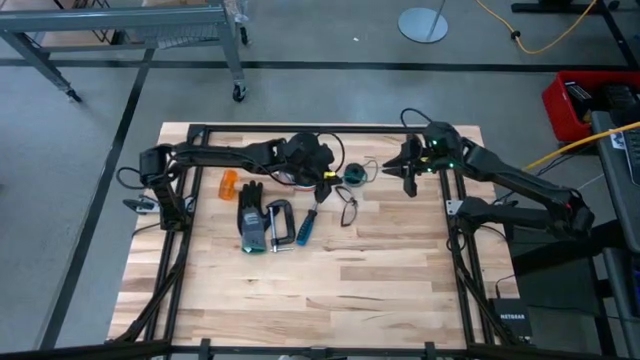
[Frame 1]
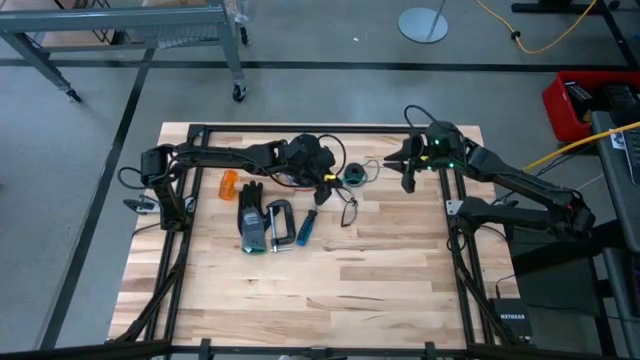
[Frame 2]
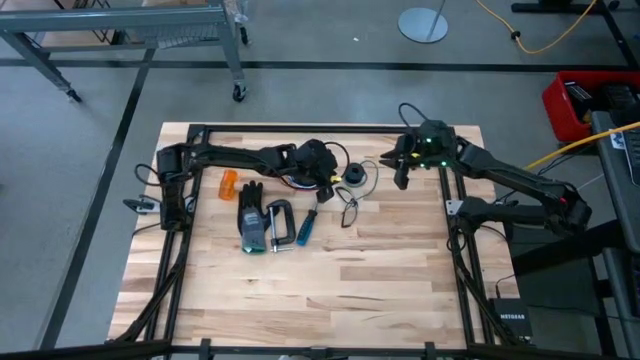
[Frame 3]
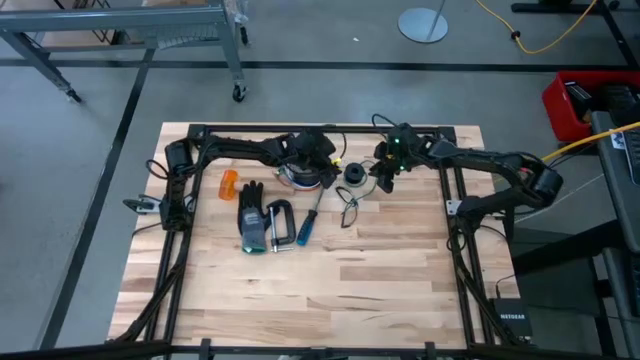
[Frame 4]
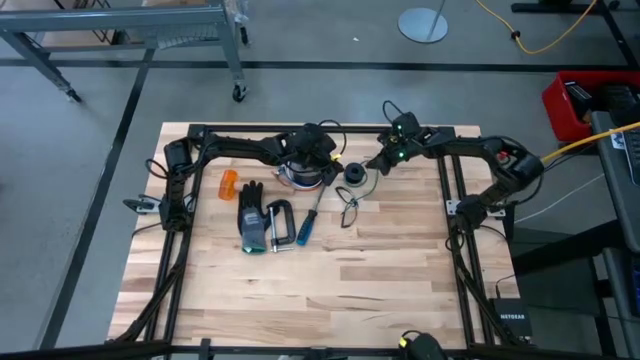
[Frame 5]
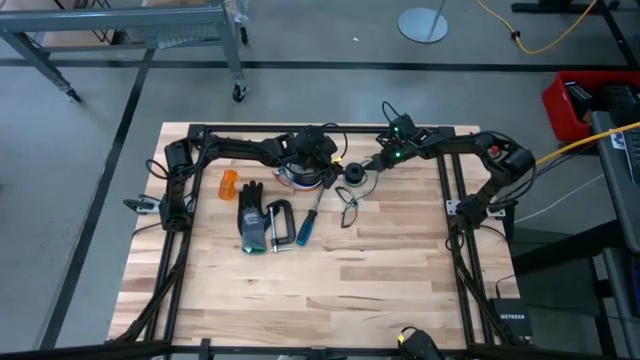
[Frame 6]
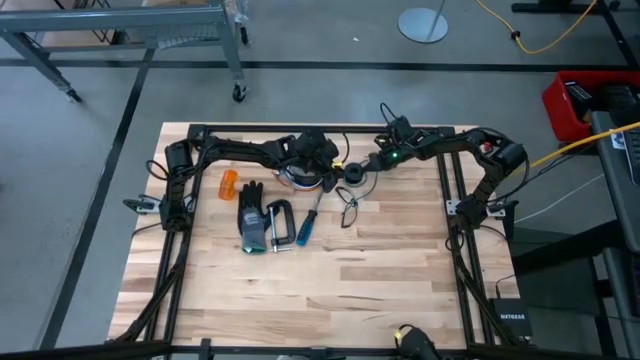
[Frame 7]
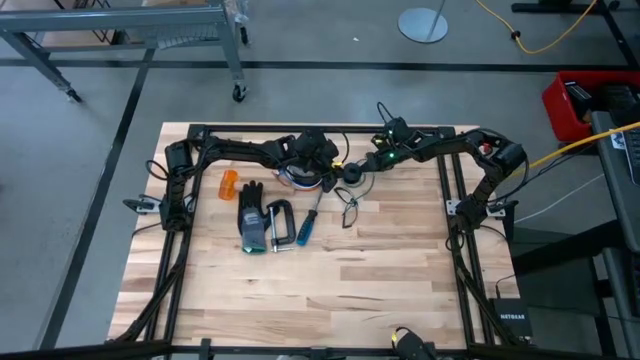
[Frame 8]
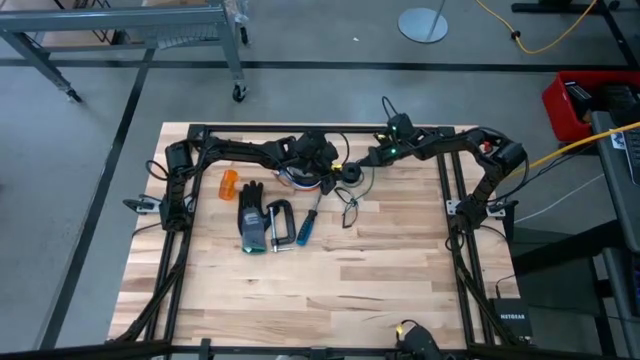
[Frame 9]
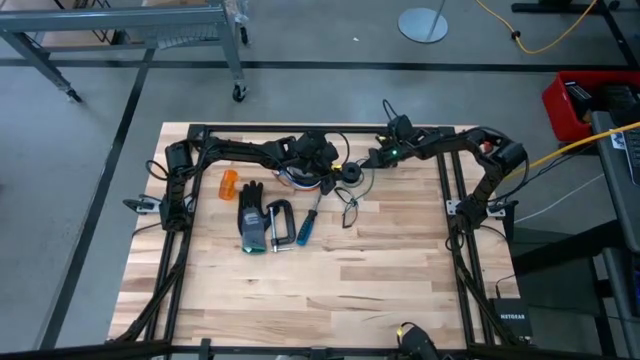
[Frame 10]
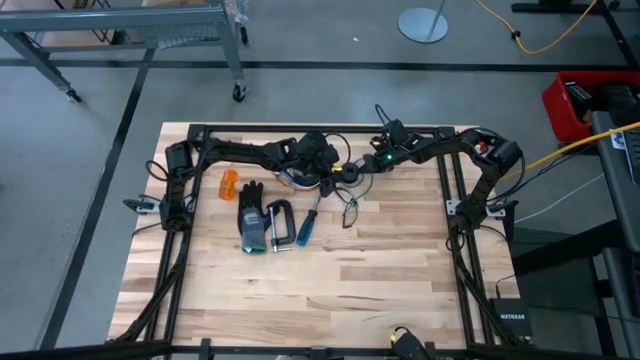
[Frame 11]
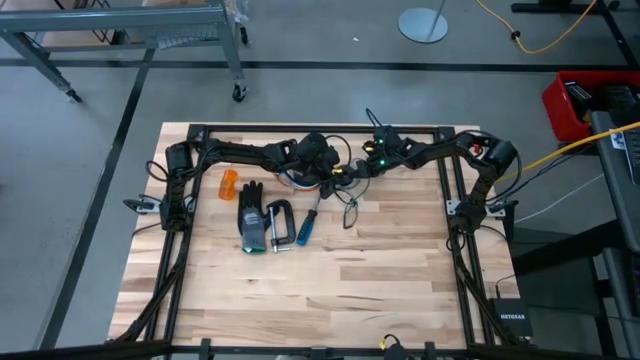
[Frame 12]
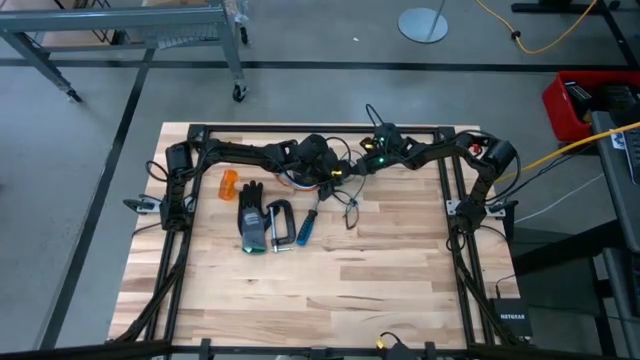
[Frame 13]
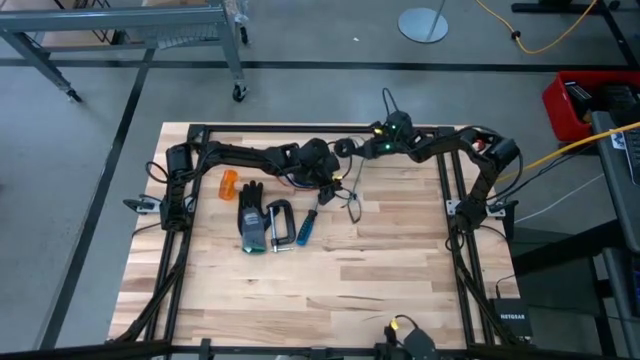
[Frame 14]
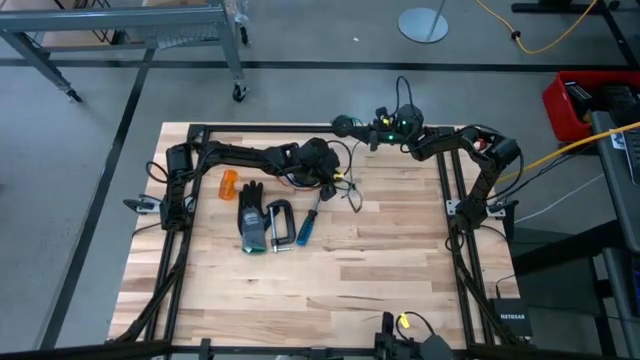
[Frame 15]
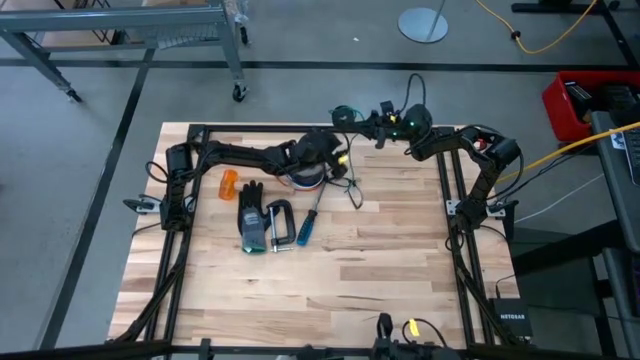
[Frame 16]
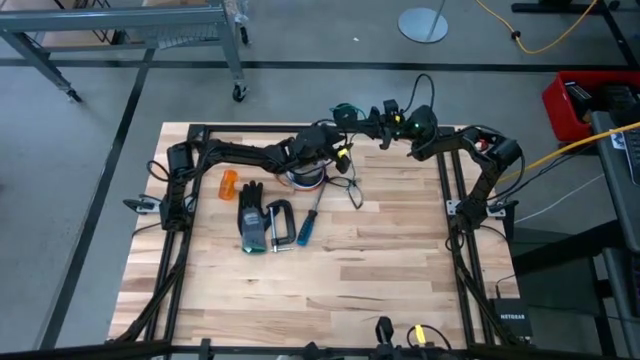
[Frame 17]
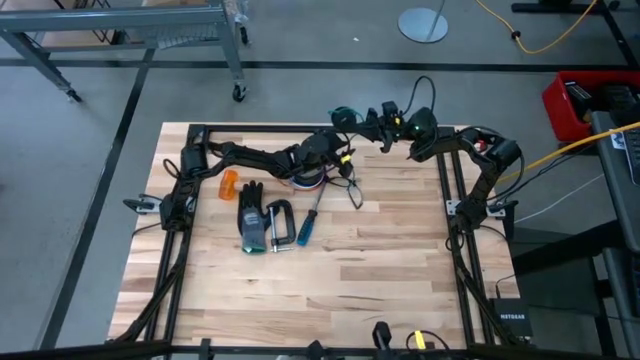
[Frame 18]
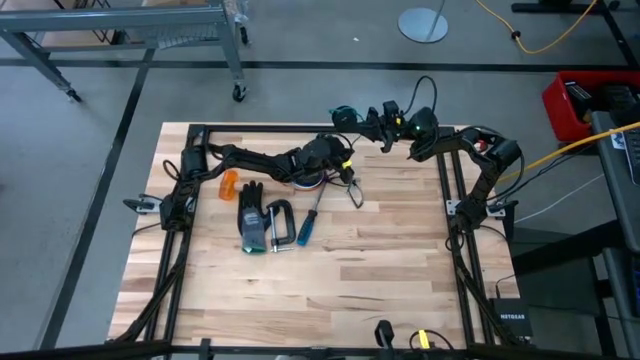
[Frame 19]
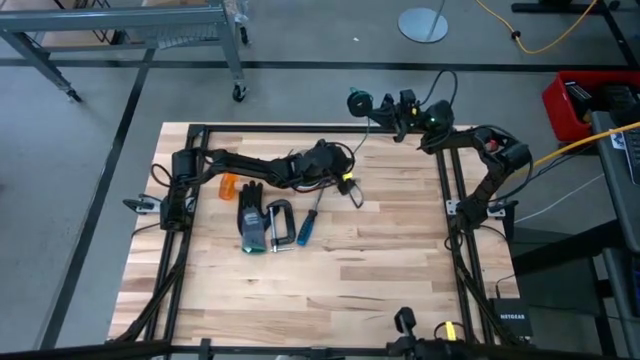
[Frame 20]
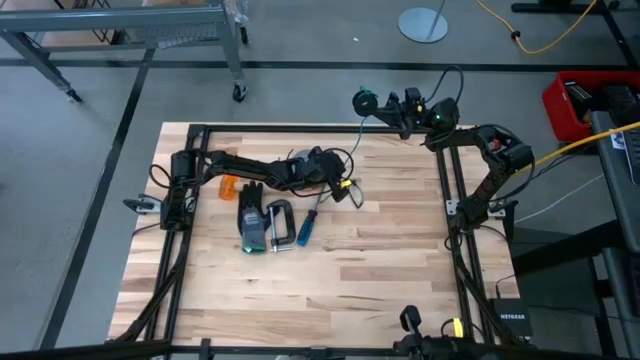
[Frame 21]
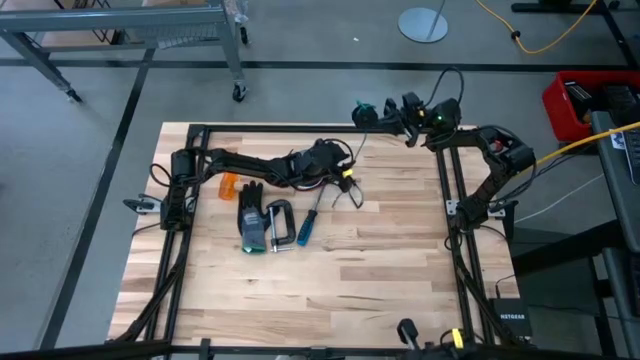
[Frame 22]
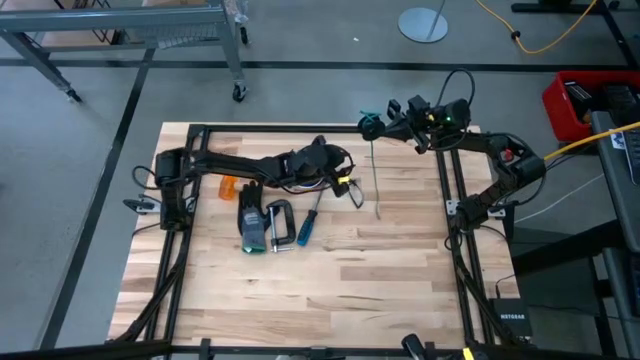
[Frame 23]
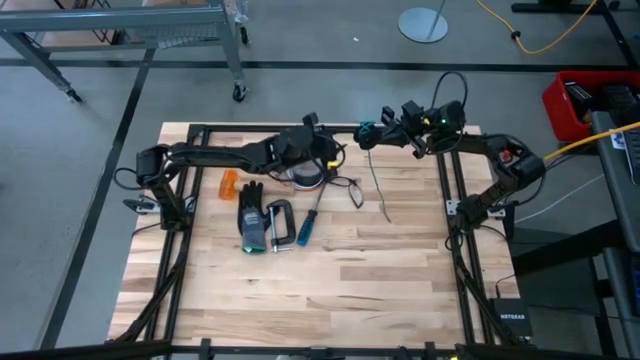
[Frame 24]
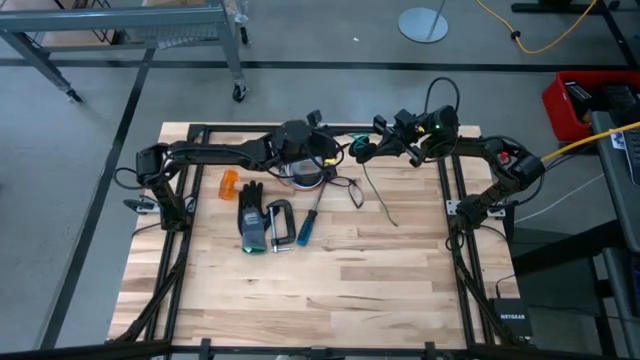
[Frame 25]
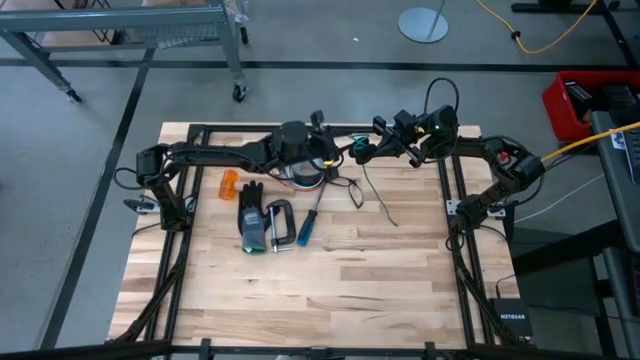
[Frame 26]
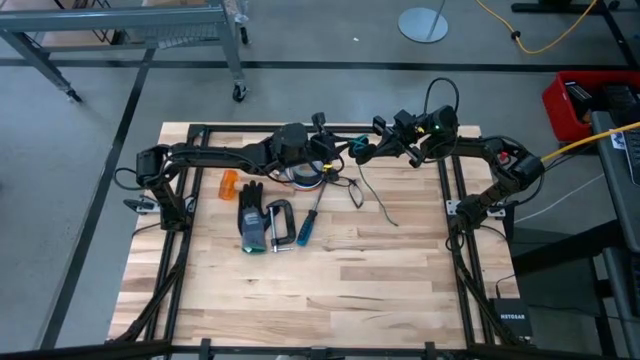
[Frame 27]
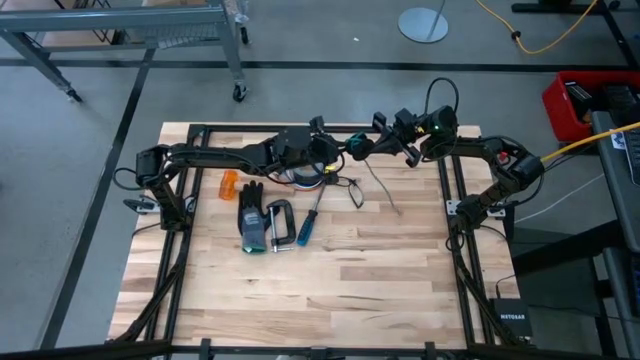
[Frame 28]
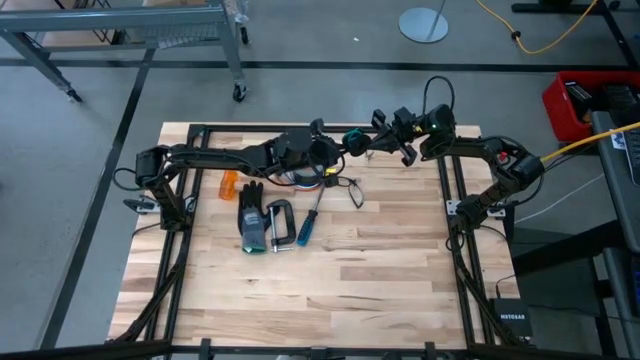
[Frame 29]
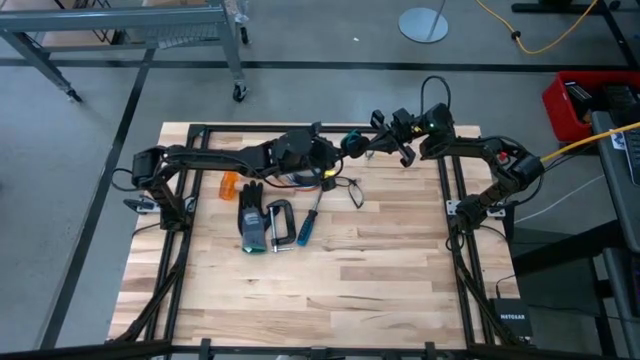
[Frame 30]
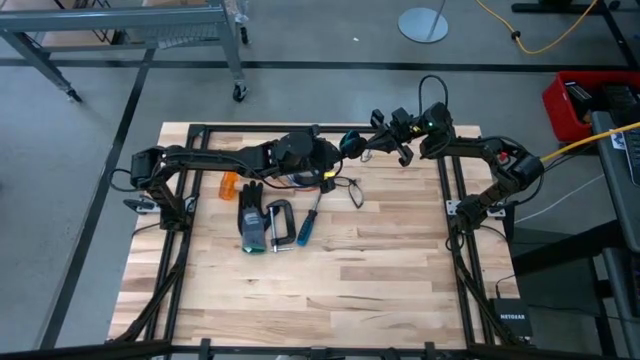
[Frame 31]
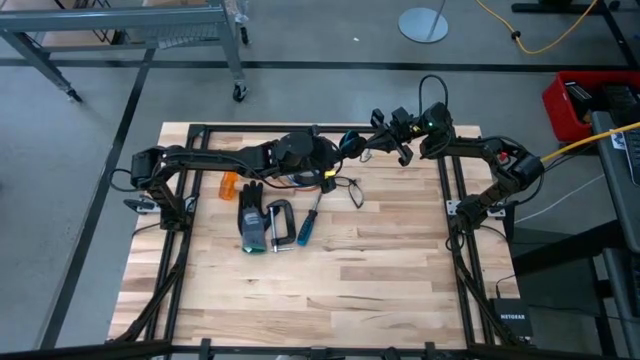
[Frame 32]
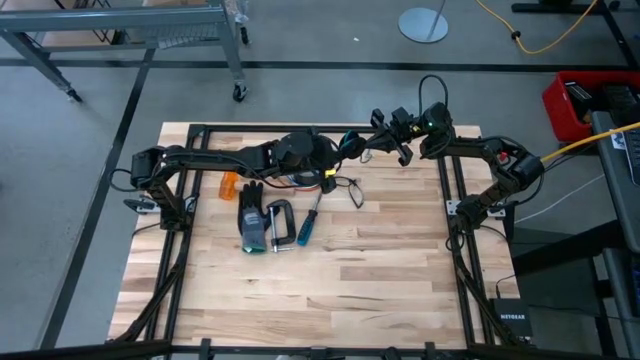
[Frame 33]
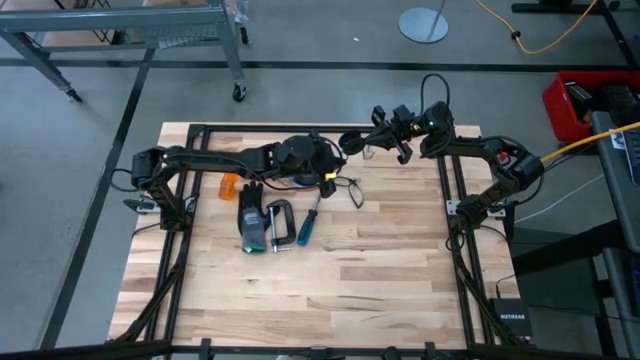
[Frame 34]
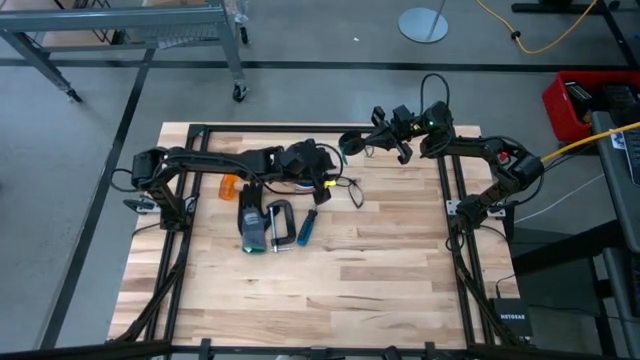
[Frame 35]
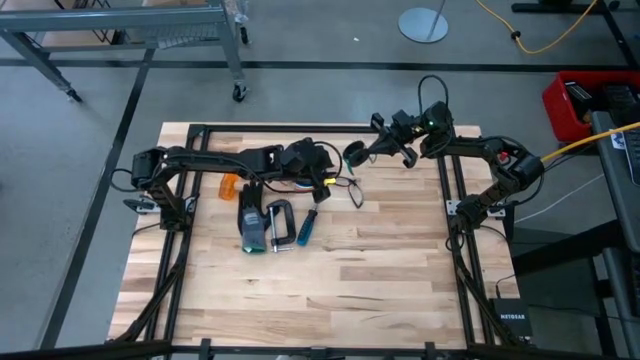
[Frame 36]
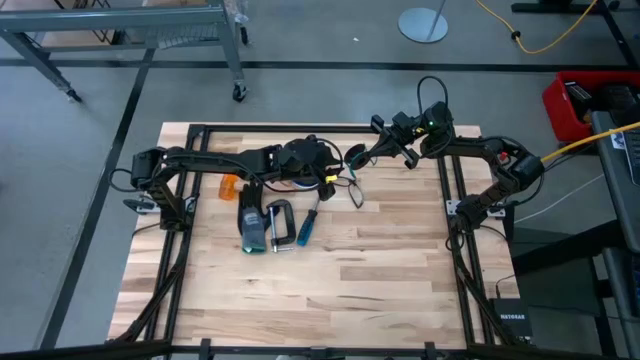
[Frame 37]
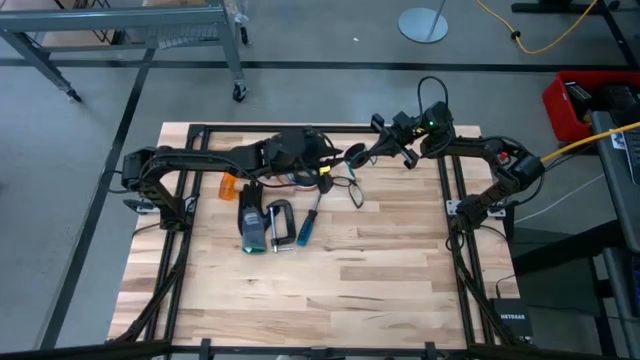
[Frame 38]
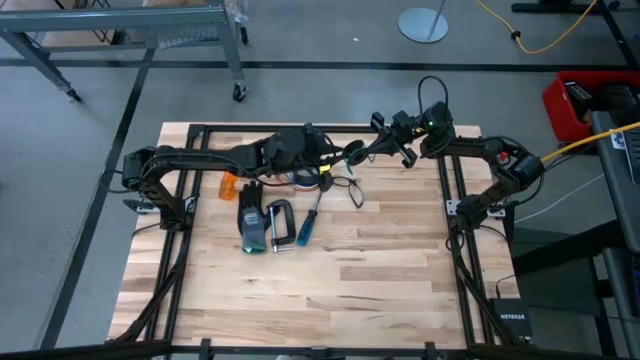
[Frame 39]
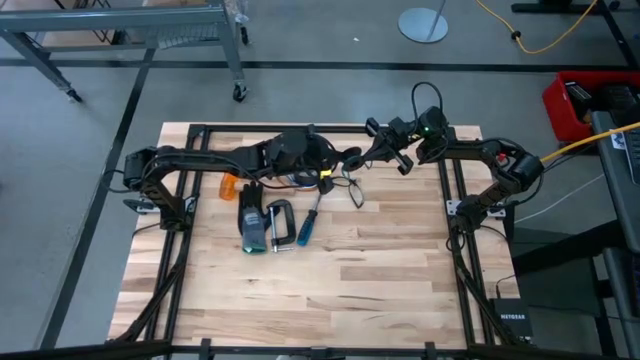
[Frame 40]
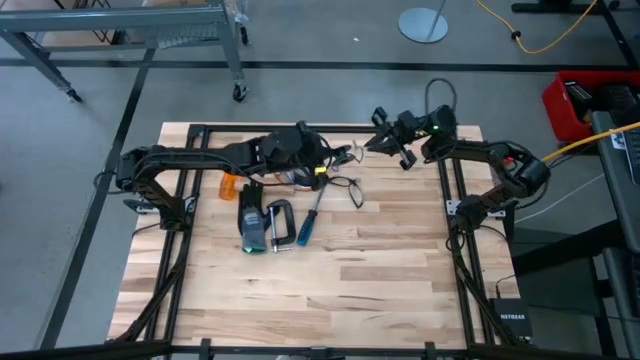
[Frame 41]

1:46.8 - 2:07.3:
Task: Coil cords
Coil the wire in the cable spool

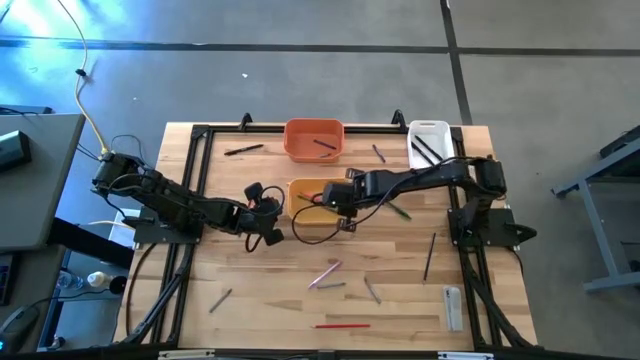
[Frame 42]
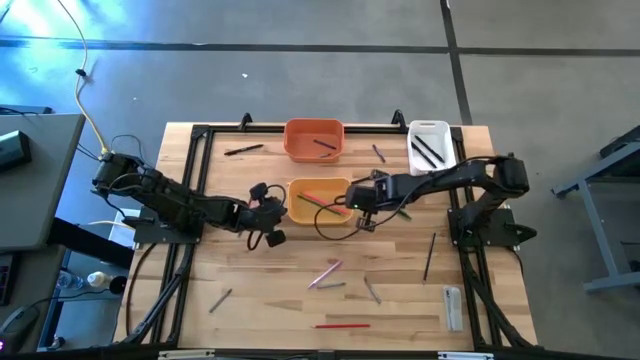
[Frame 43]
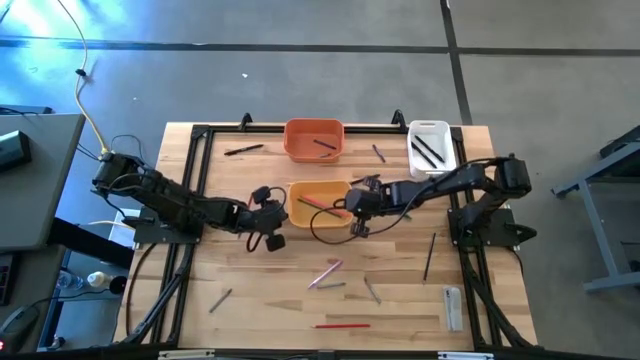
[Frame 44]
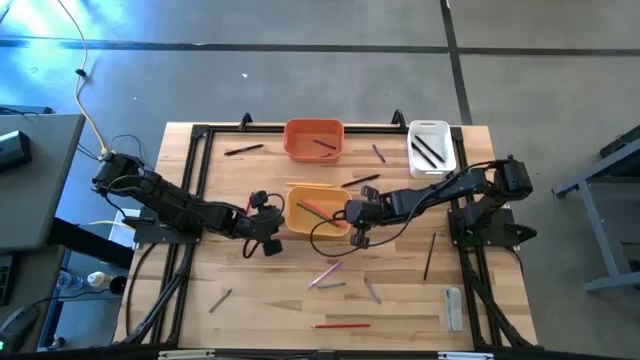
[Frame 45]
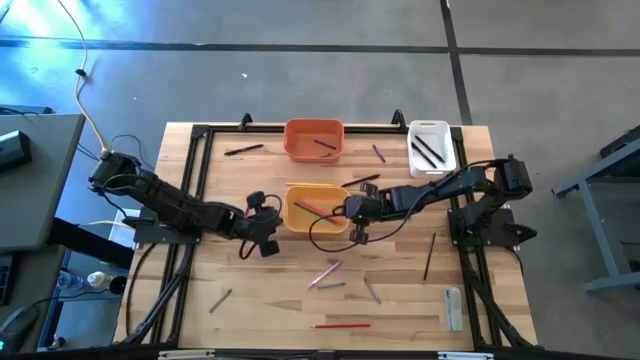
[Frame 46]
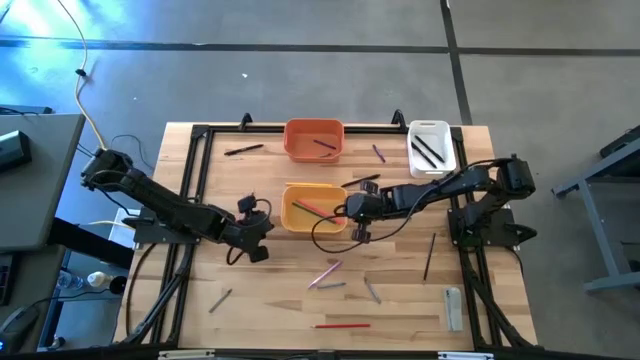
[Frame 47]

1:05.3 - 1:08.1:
Task: Sort crayons/erasers/pens/pencils in bins
Adjust the yellow bin
